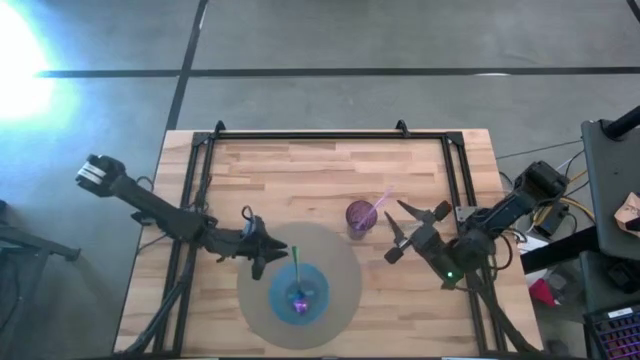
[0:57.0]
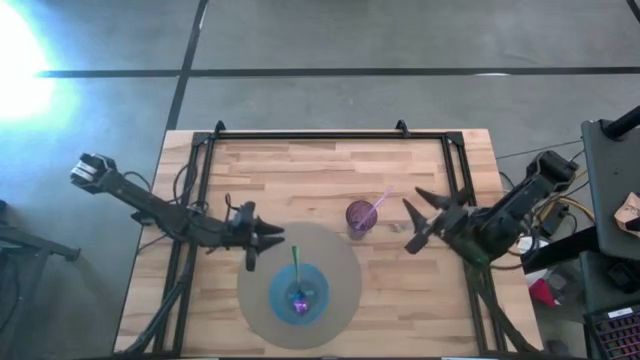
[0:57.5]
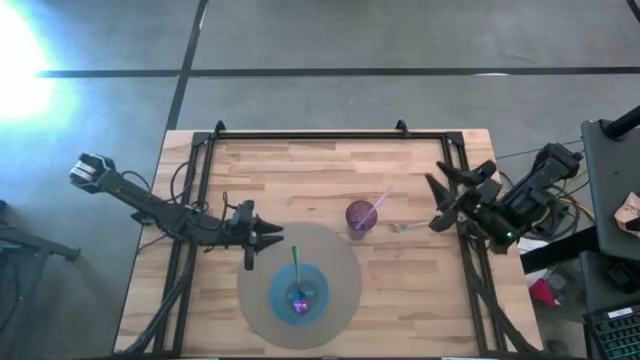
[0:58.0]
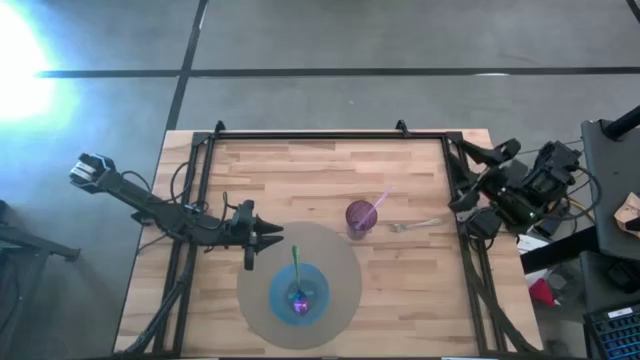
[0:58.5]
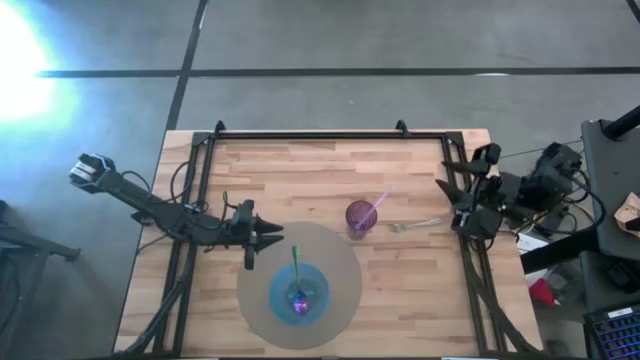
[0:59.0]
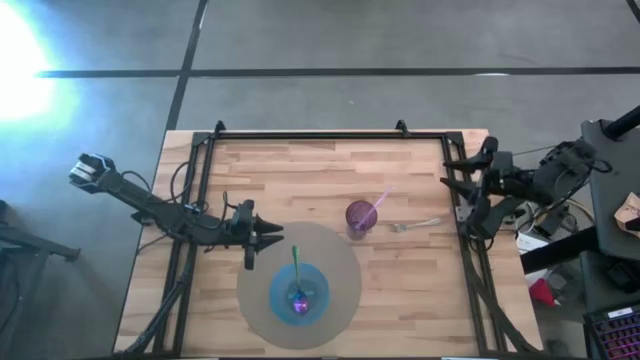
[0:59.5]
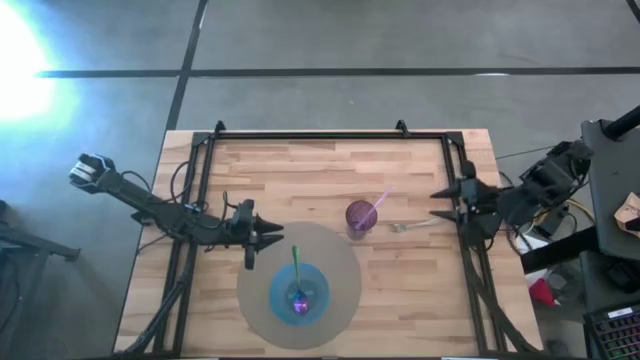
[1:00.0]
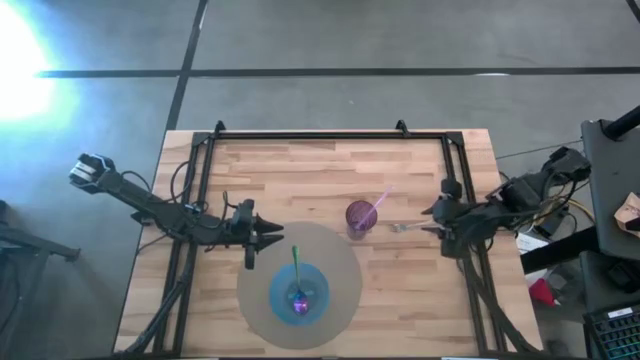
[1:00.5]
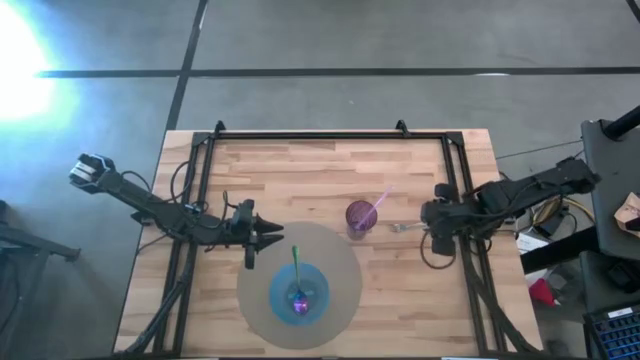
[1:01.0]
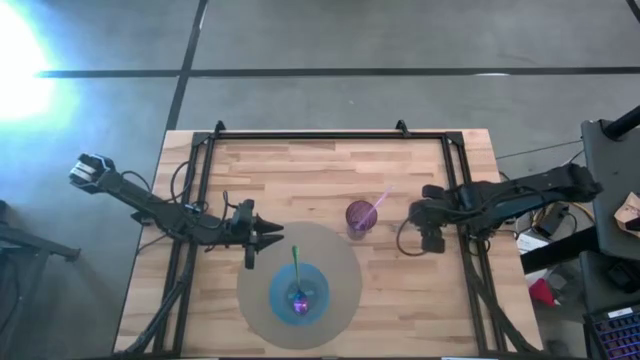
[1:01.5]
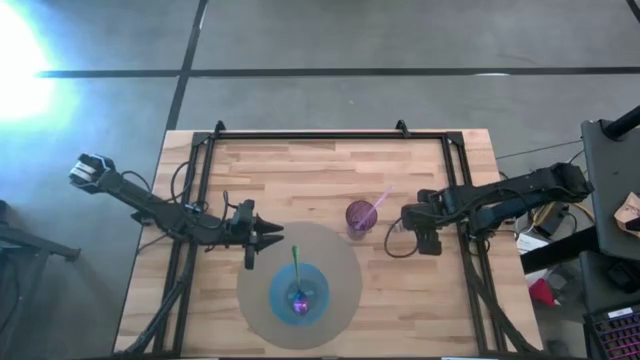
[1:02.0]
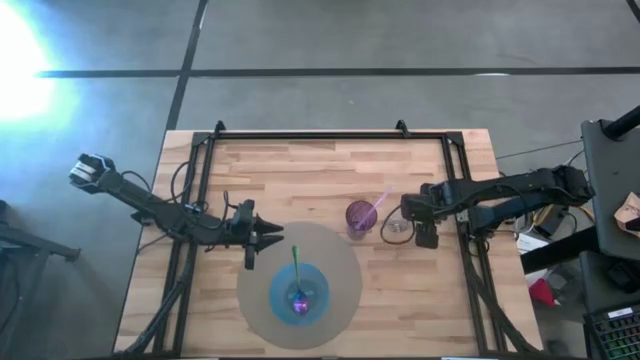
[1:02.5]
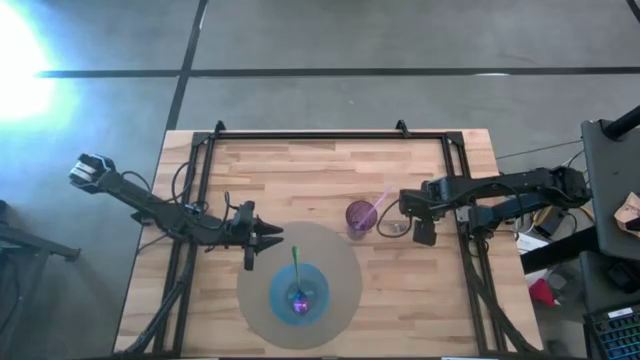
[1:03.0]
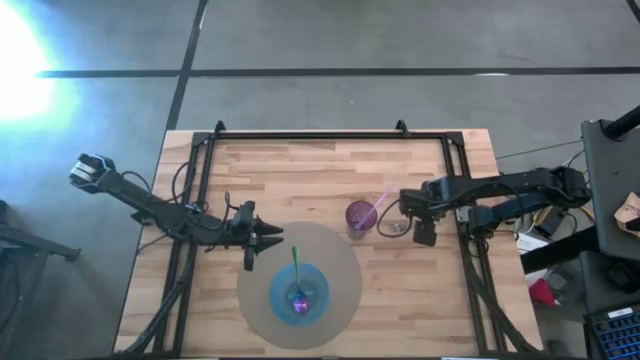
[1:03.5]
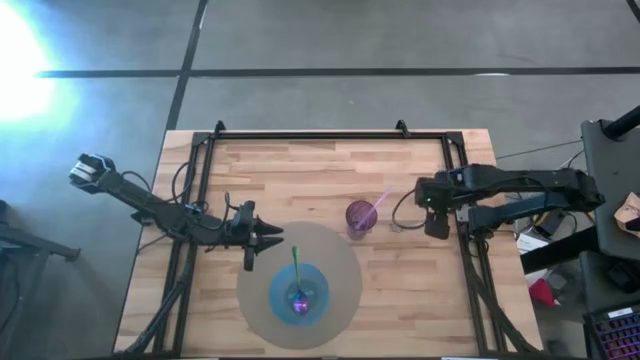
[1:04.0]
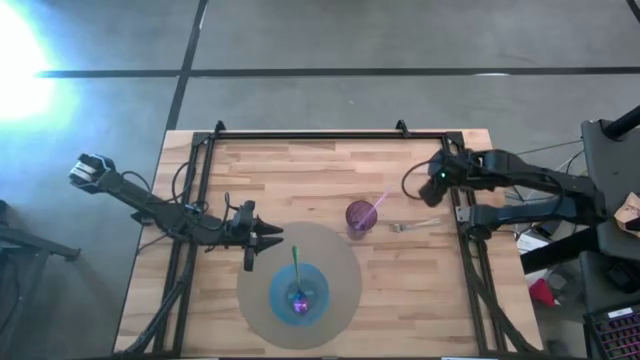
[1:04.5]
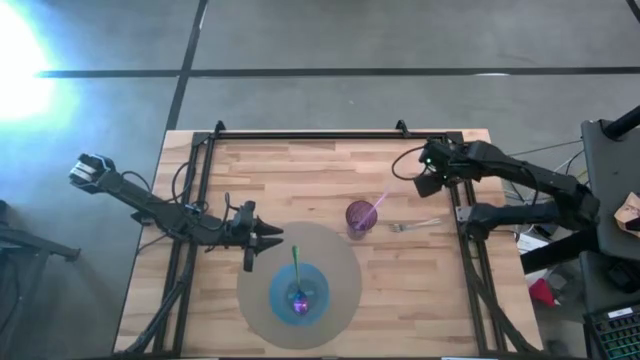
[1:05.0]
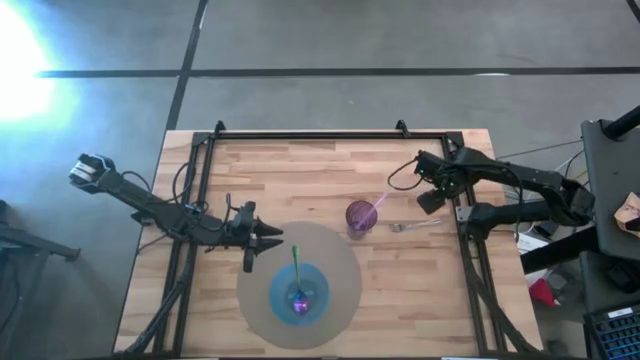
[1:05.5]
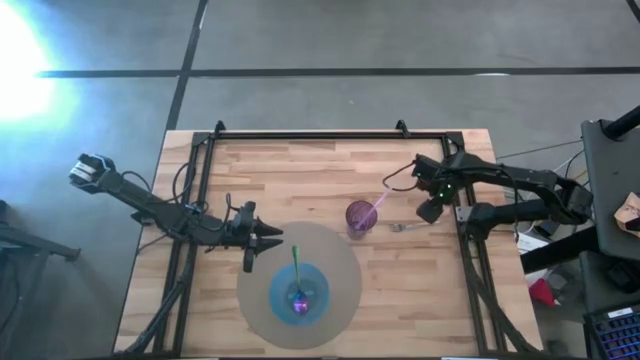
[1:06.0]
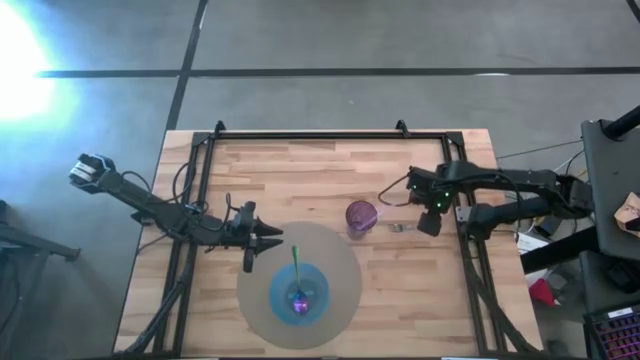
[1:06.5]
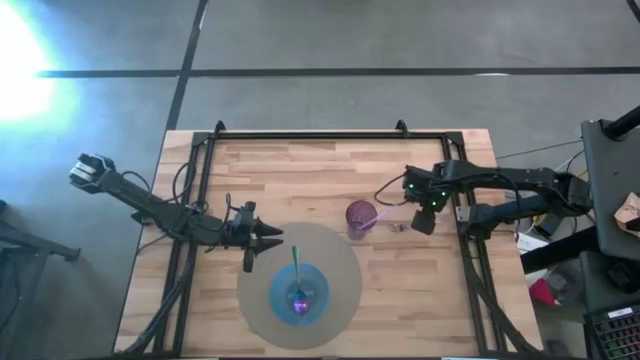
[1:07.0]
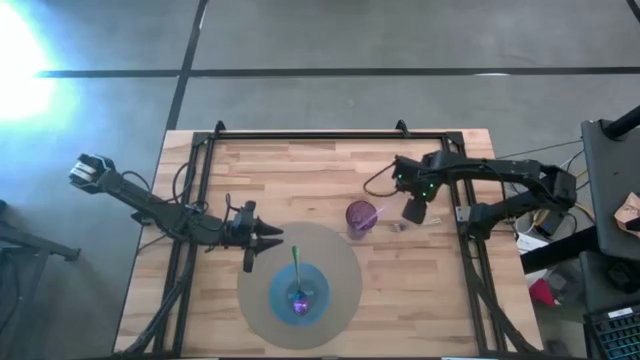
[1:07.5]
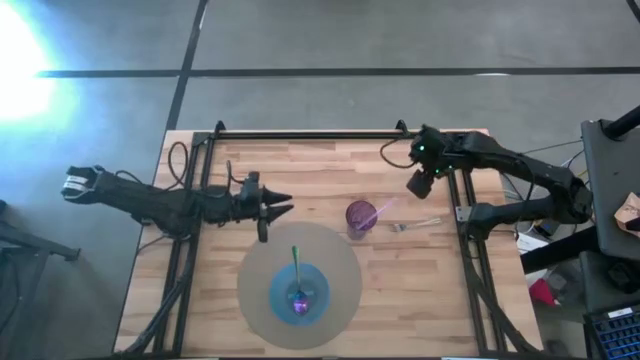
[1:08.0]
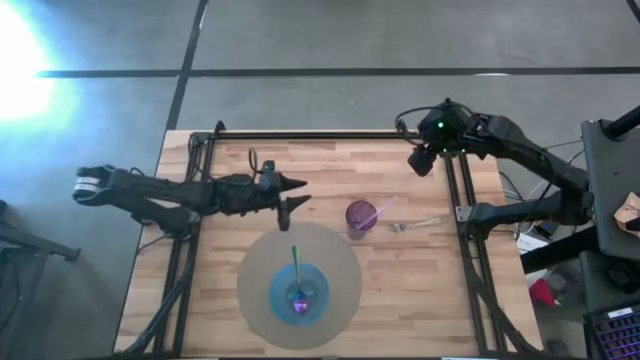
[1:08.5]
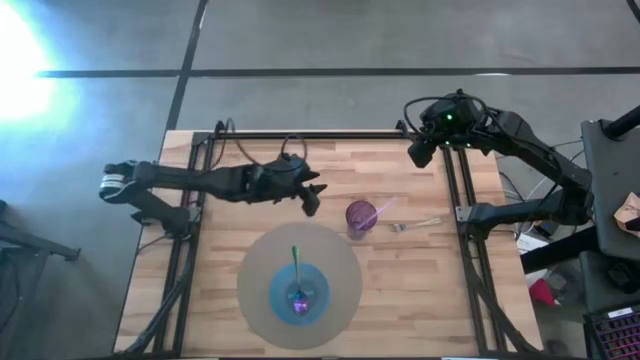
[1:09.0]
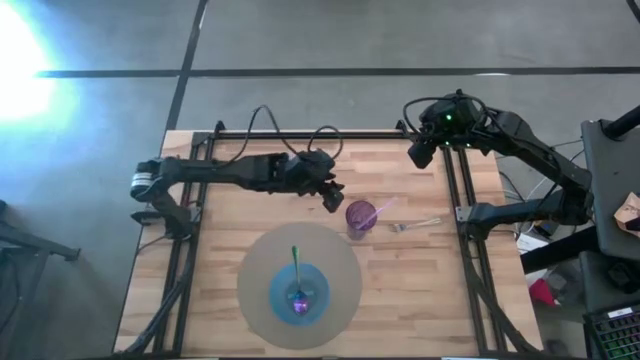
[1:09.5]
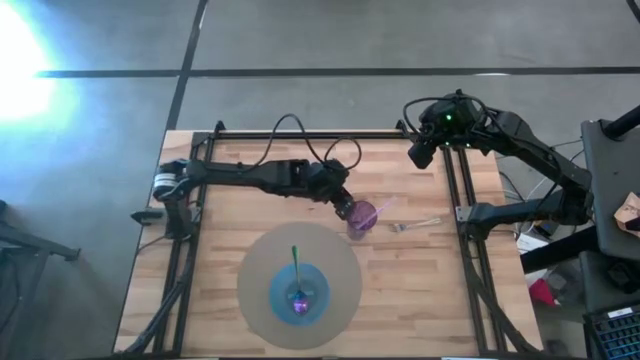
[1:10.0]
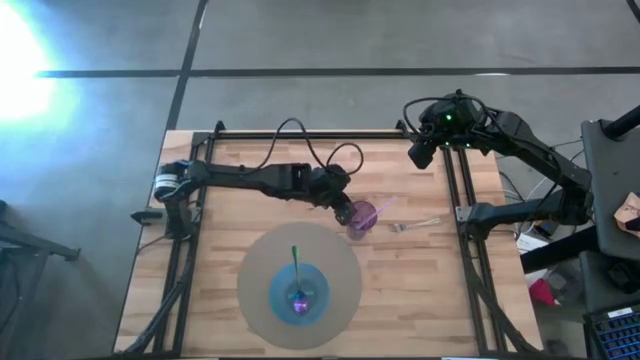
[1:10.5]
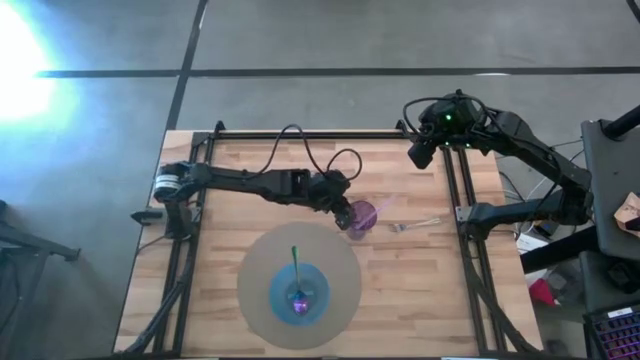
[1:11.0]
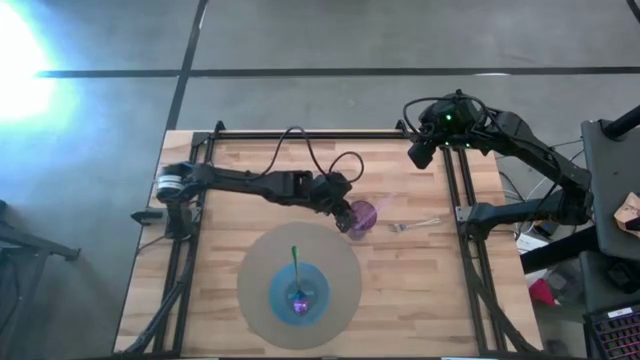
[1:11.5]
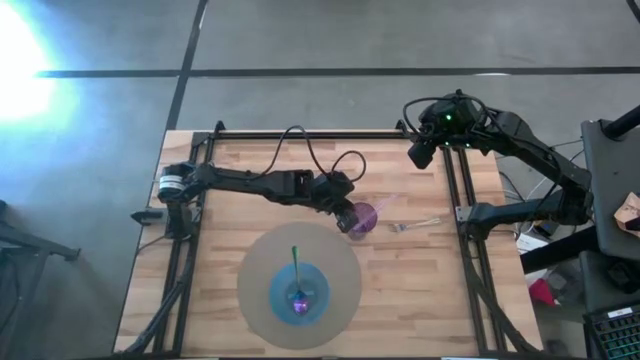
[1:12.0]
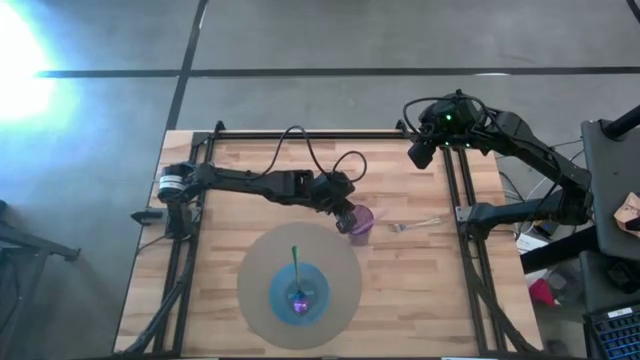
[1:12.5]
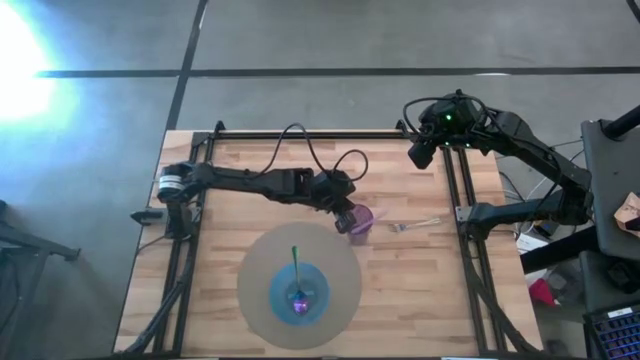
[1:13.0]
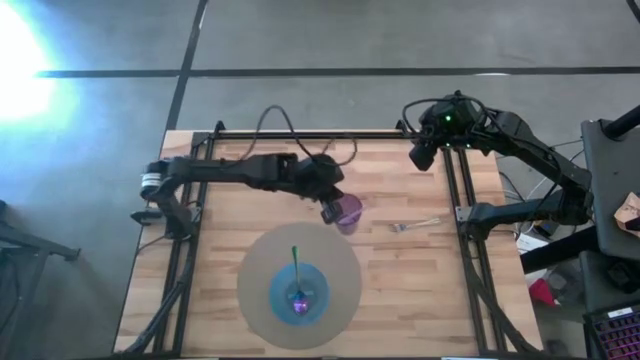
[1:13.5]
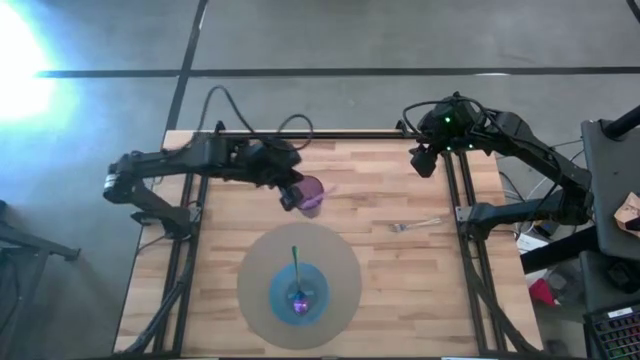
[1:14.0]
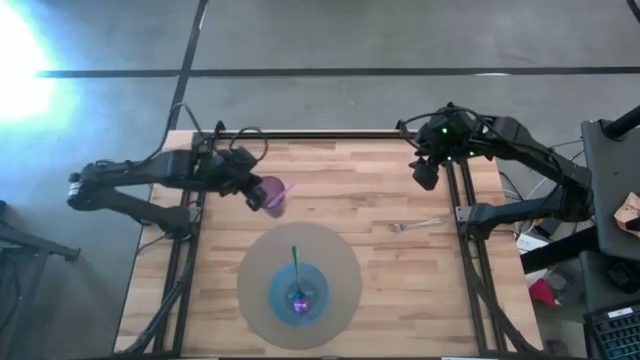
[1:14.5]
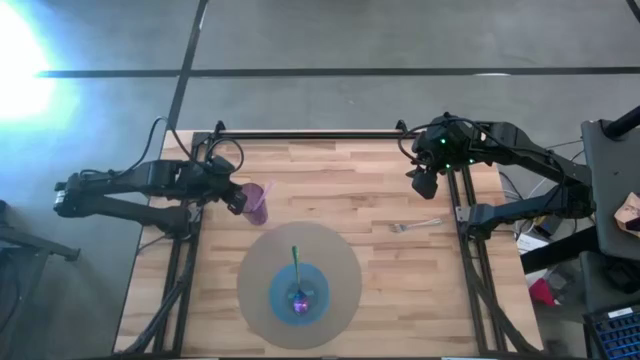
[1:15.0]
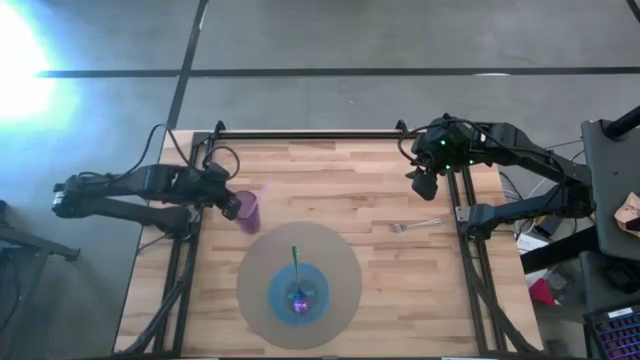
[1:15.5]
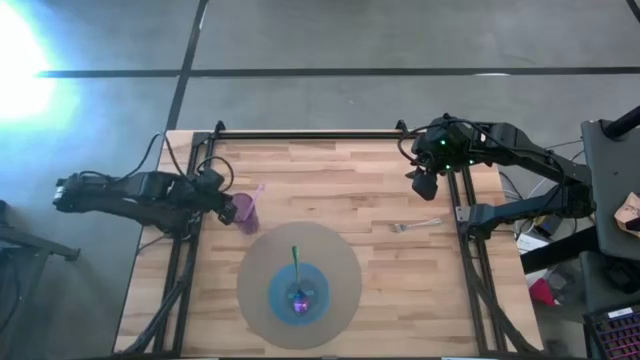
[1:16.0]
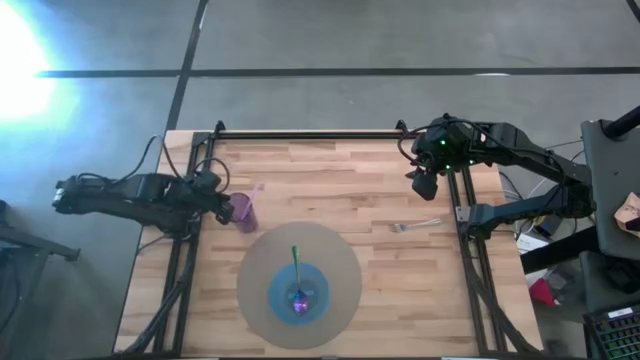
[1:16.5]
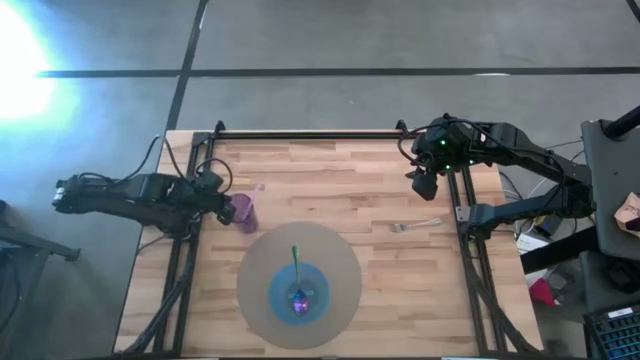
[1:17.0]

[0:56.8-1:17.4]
Task: Pick & Place Utensil
Move the purple cup to the top left of the brown placemat

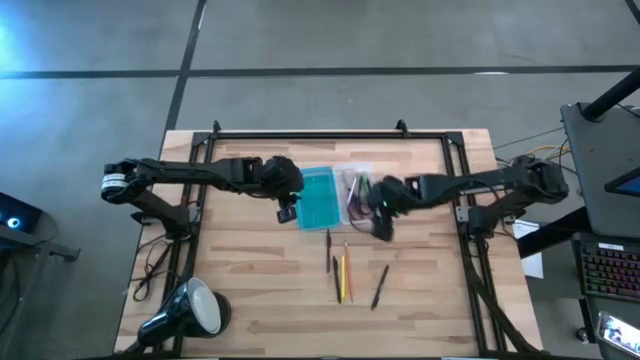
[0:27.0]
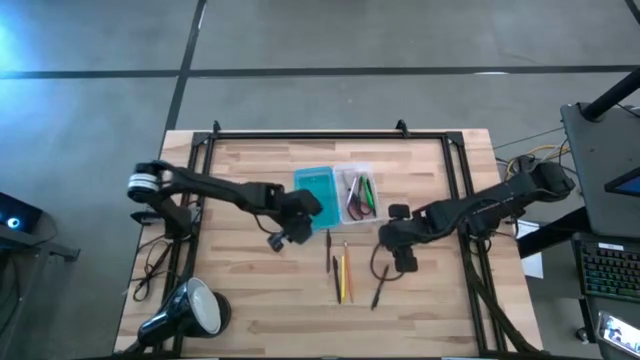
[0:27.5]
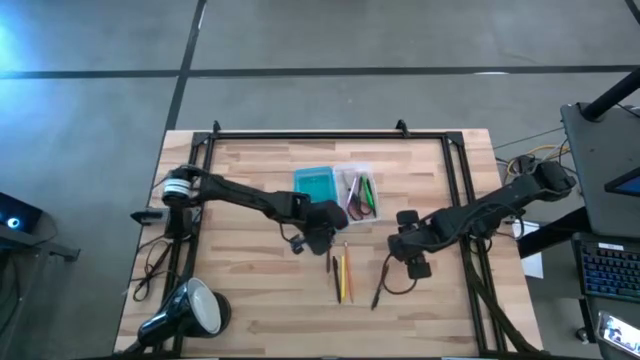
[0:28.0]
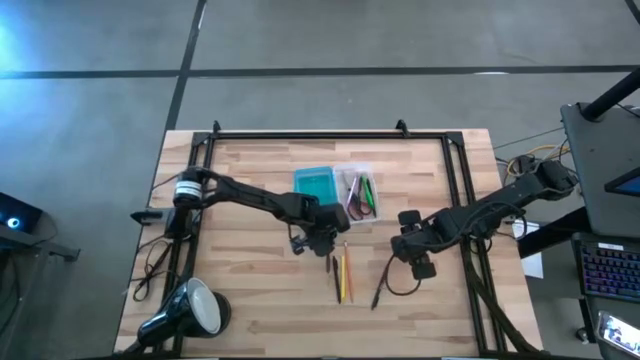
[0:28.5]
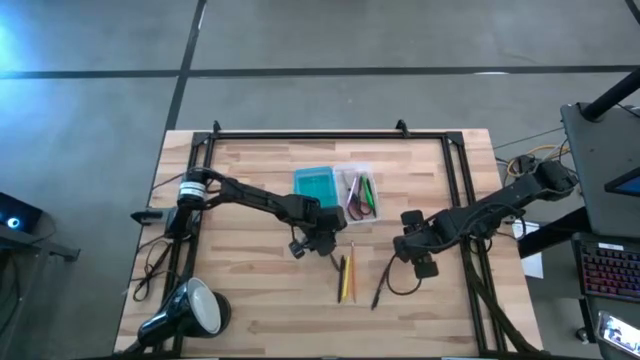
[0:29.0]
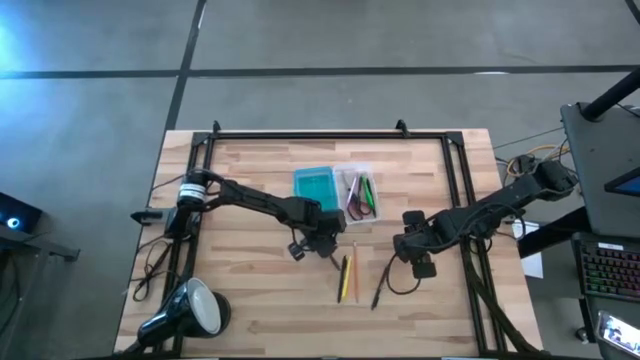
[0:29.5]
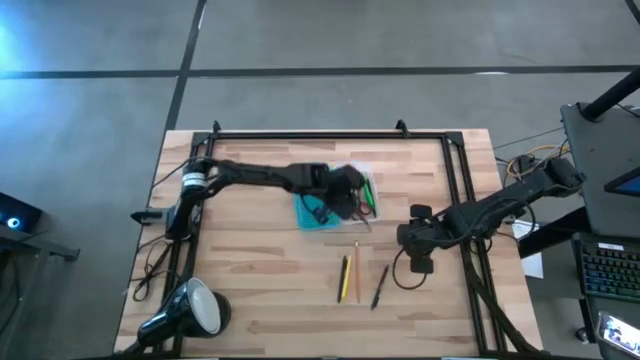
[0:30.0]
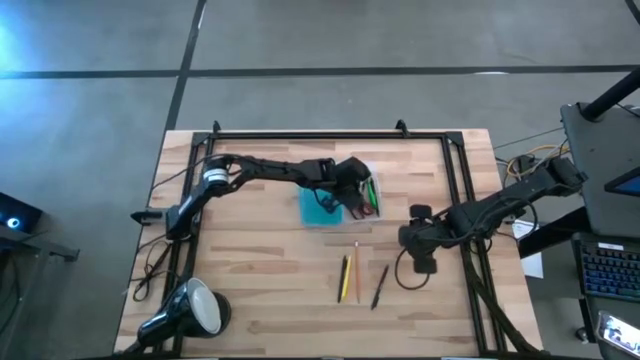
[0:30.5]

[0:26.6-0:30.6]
Task: Pick & place school supplies into a supply box
Put the brown pen into the blue supply box
